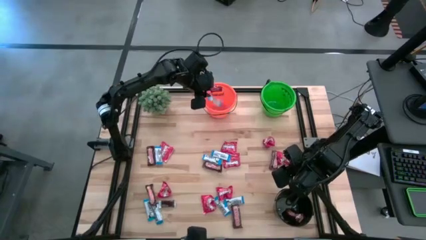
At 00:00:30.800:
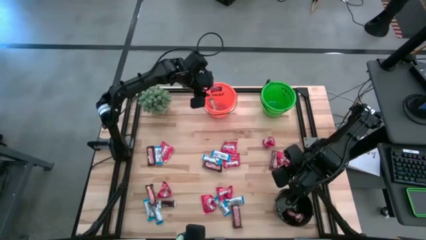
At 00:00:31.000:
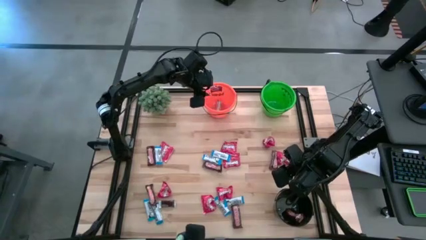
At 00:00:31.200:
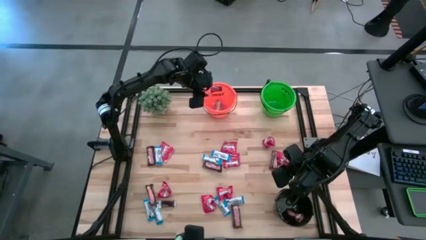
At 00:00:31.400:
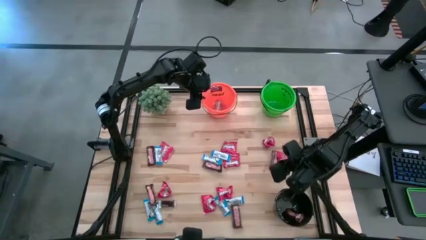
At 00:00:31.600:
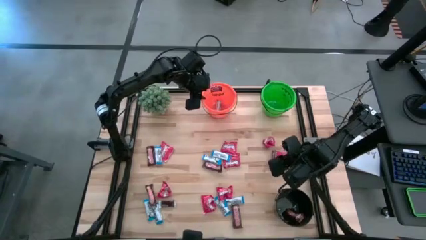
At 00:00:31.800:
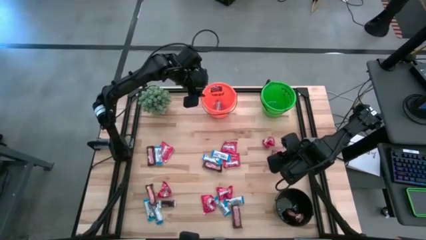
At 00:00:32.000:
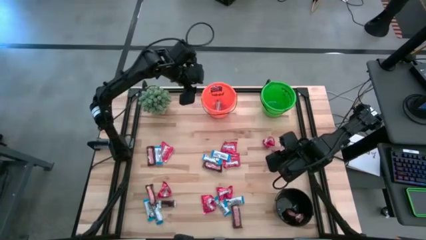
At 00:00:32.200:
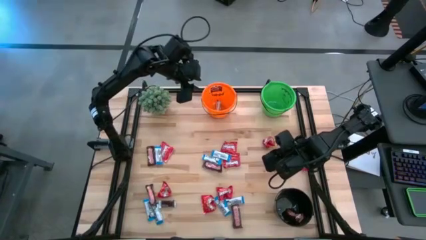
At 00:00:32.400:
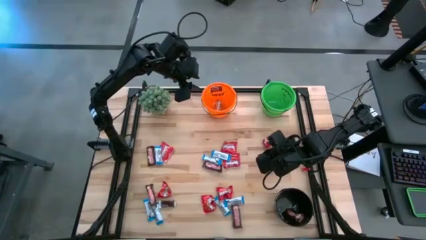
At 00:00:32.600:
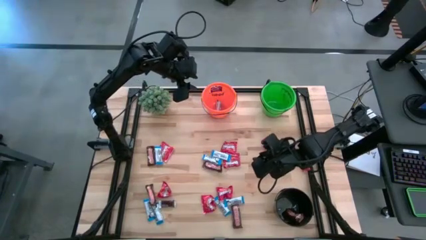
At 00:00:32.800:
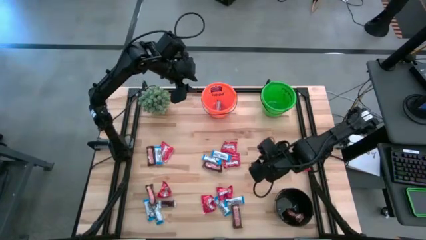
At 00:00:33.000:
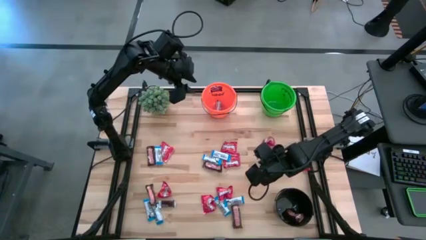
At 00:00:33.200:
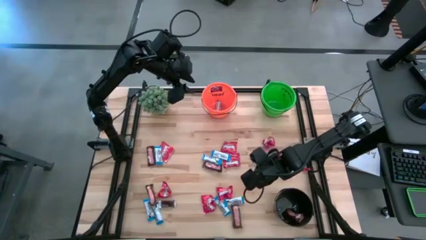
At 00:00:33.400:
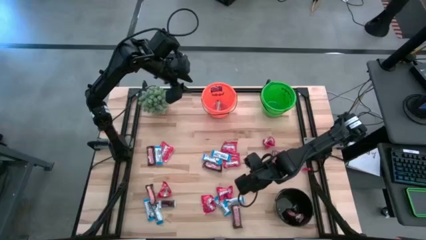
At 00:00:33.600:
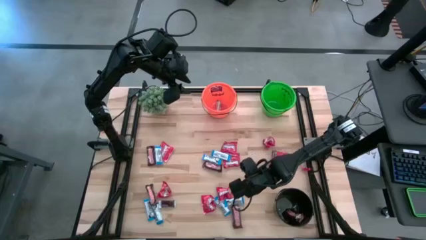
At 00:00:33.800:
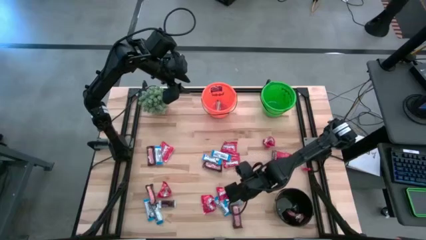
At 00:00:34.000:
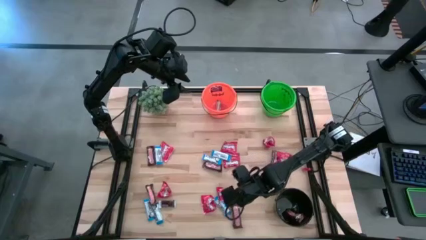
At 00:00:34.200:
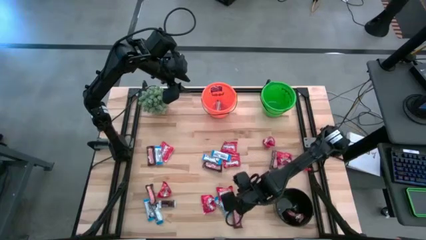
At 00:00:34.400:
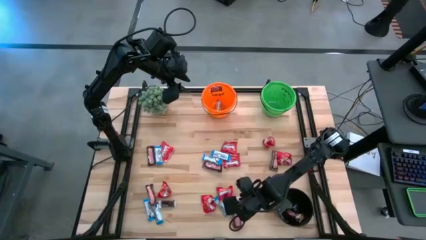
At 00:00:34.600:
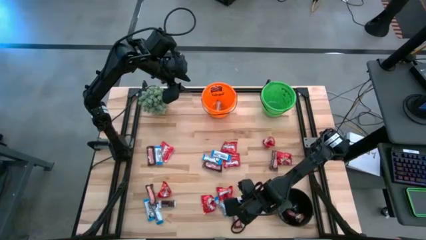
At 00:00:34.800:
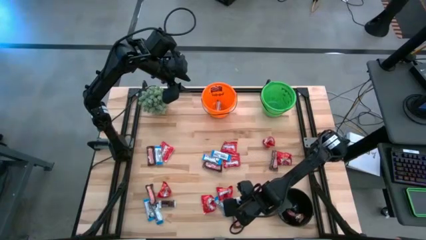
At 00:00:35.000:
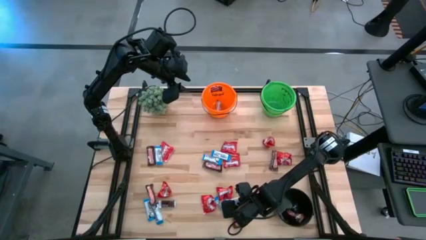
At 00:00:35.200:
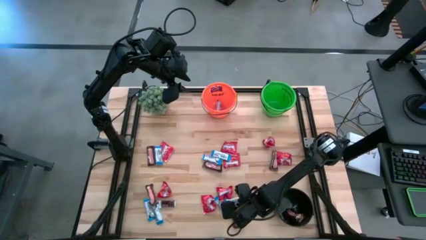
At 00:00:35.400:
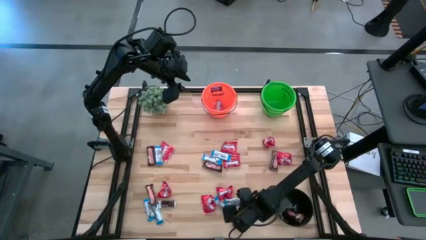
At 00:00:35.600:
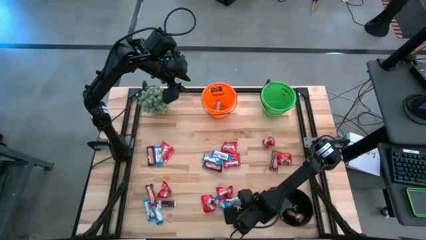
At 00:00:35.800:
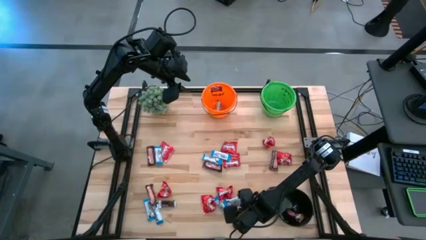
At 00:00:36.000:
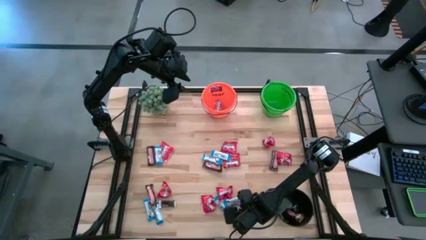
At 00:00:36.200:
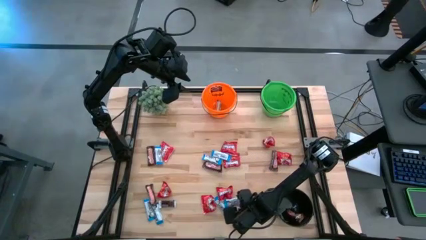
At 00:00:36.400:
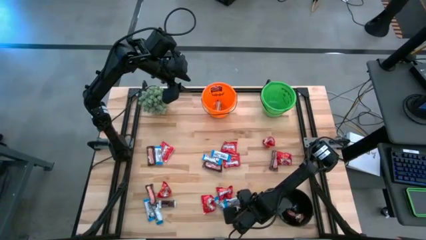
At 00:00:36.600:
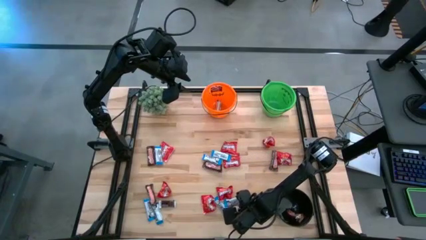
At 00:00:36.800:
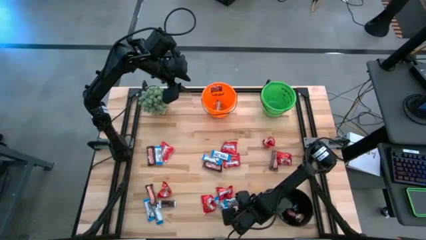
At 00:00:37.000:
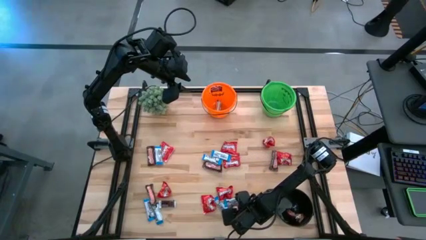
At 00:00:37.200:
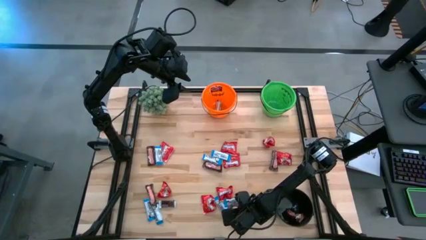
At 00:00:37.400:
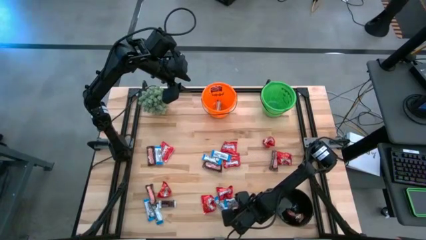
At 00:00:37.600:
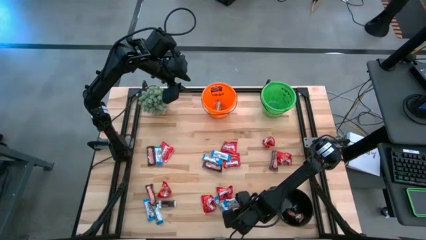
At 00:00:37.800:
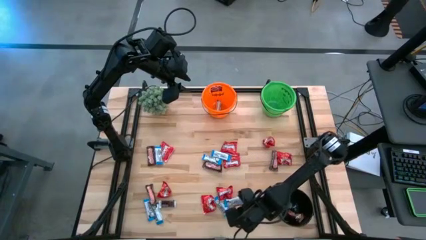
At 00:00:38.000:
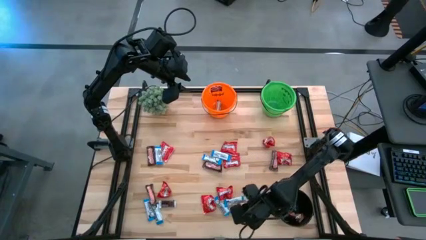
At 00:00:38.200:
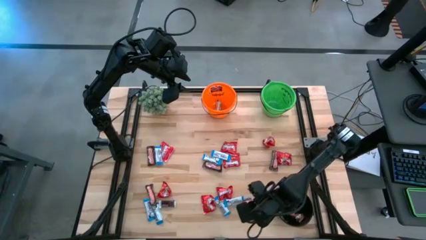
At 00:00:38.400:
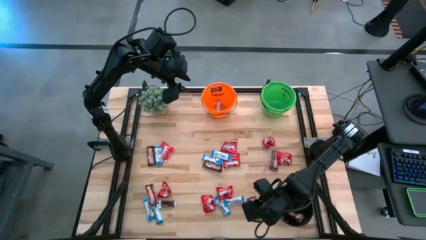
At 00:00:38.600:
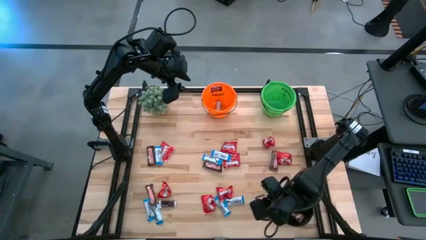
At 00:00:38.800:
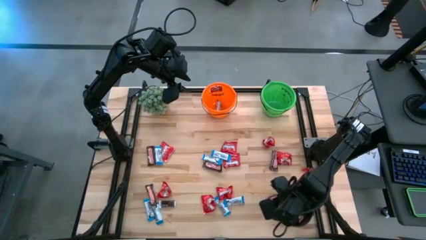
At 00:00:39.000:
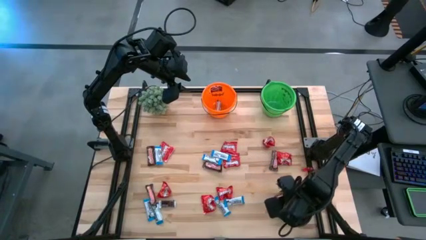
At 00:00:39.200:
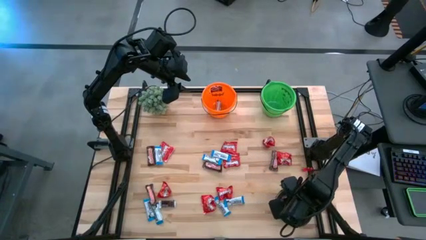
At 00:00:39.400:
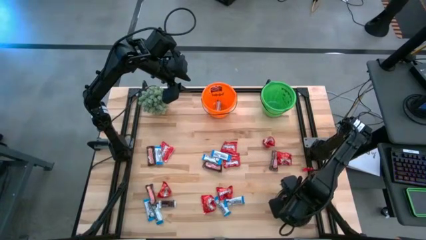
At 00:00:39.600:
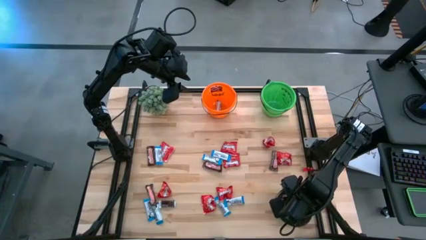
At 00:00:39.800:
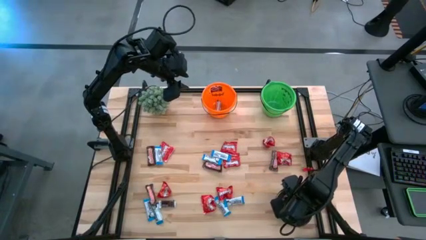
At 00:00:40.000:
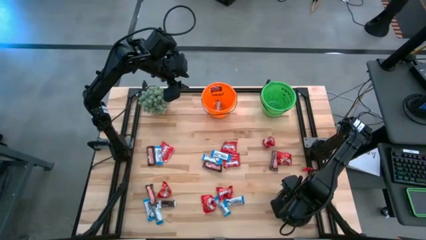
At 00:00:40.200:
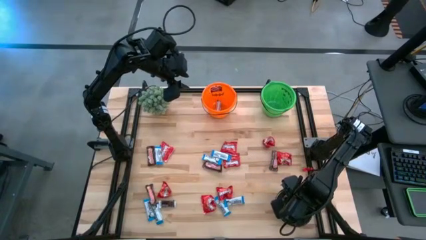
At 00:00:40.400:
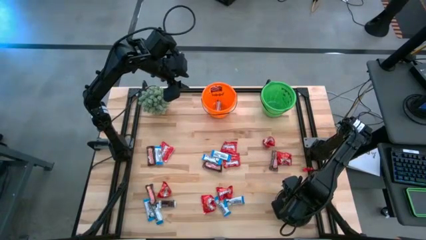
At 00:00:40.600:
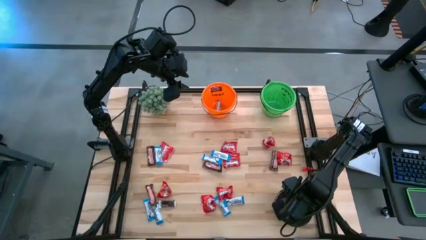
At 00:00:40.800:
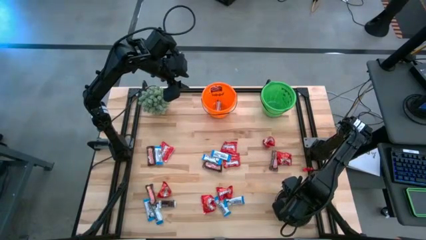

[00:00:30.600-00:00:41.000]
Task: Organize candy in baskets
Put the brown chocolate bar into the black bucket
